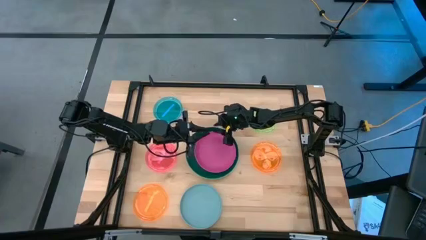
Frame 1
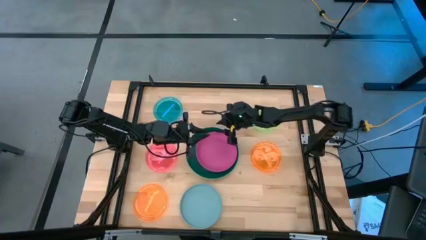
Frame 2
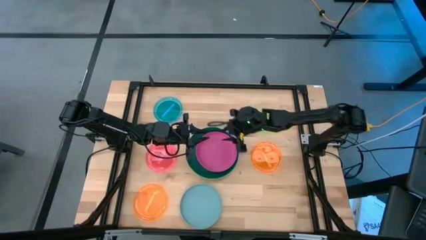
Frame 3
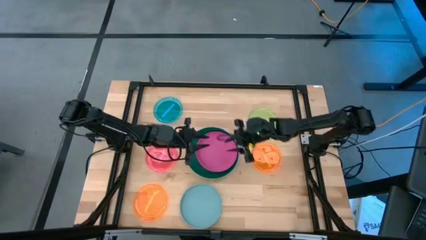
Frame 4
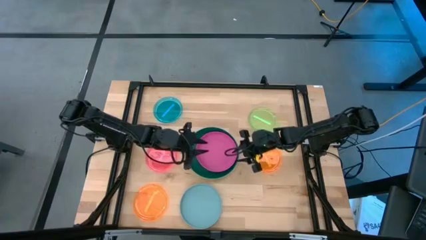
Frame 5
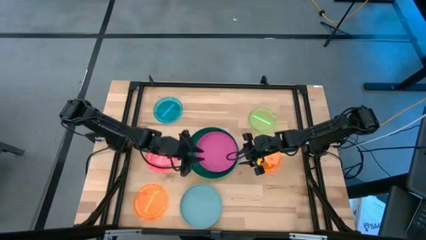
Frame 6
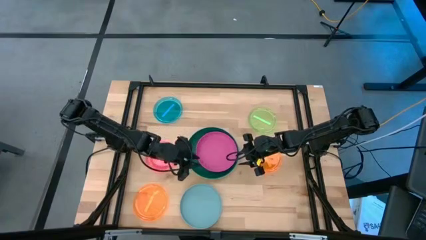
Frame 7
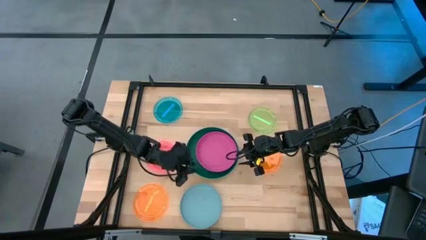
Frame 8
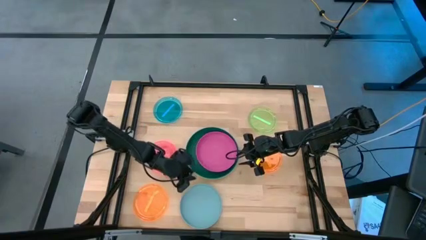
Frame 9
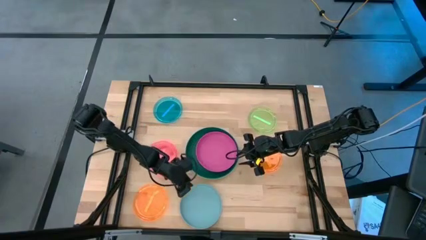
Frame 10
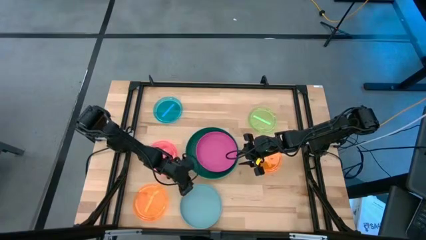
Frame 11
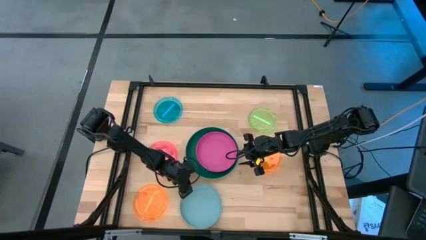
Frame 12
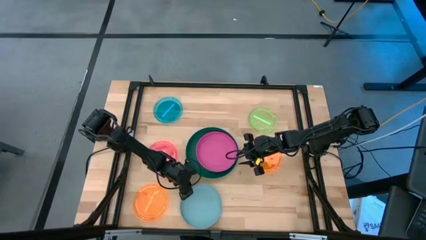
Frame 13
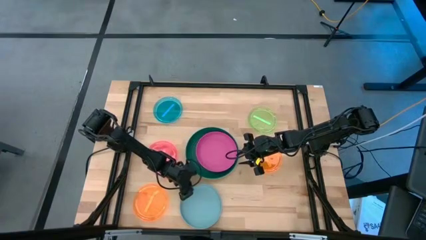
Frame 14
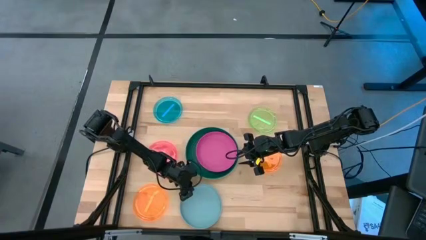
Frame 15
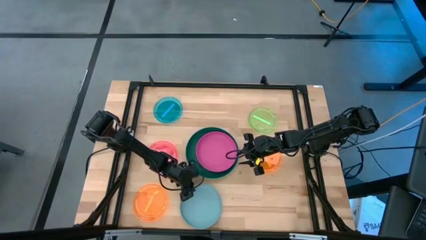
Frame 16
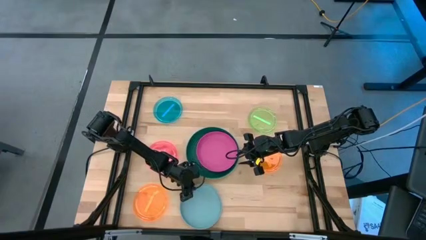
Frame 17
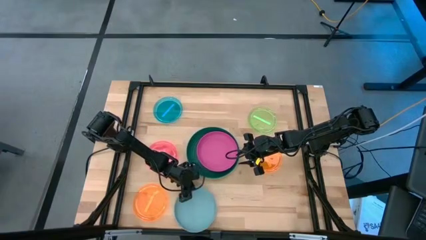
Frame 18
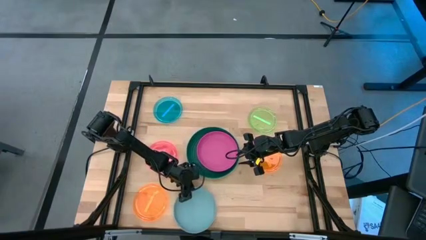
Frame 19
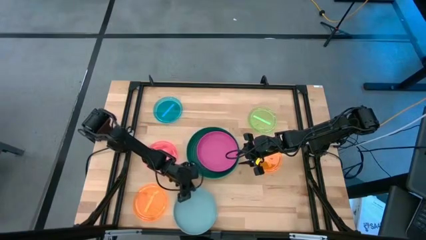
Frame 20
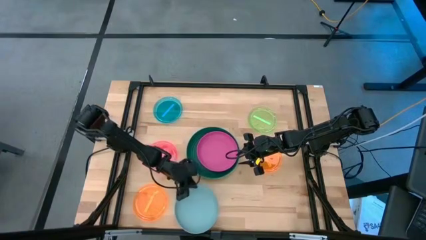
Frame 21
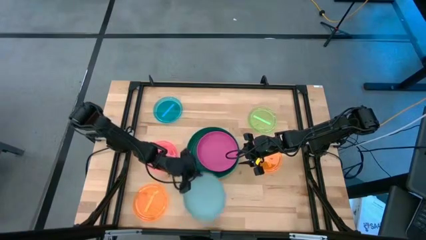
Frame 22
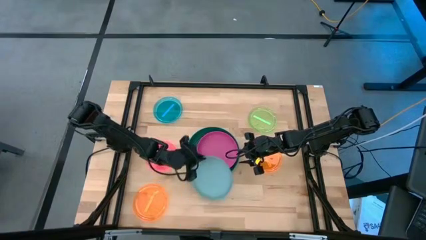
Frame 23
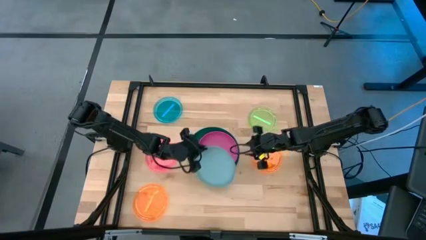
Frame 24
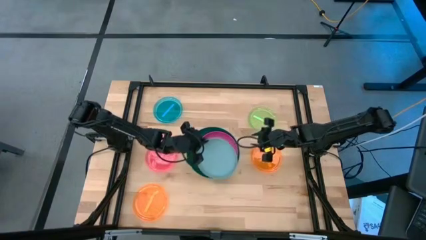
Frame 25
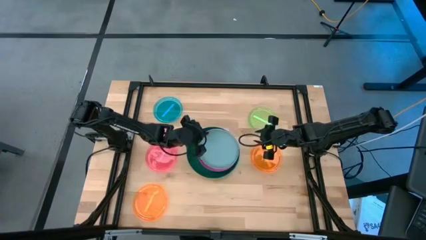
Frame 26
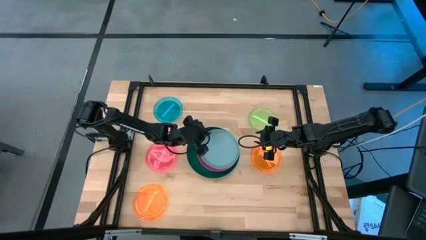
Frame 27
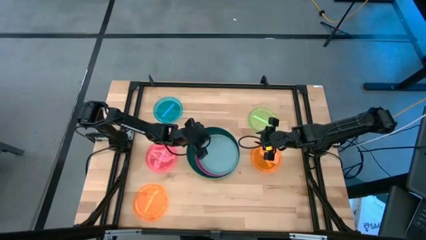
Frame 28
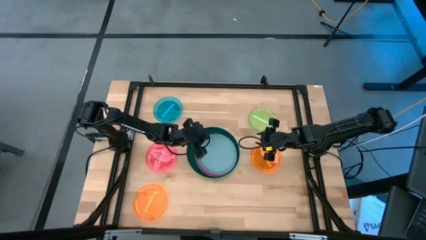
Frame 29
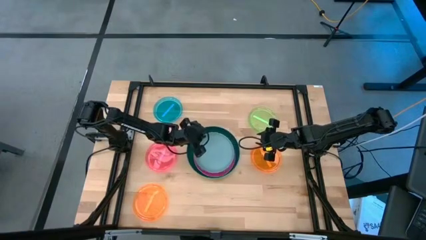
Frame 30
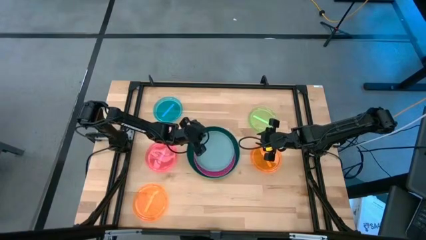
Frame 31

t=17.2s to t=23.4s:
Task: Stack plastic plates
Stack the light blue plate on top of the dark pink plate

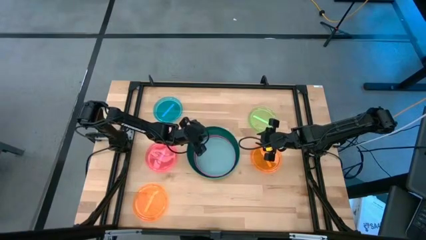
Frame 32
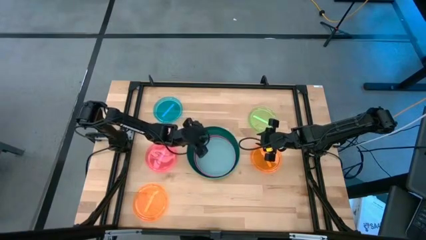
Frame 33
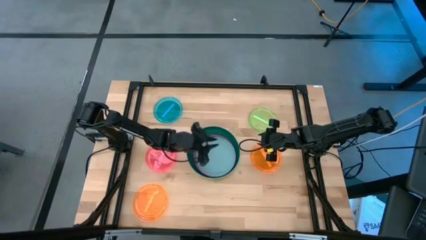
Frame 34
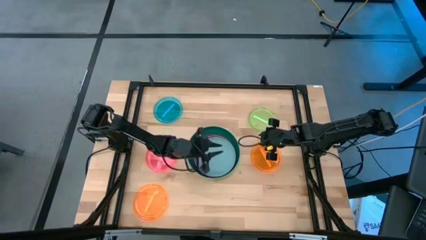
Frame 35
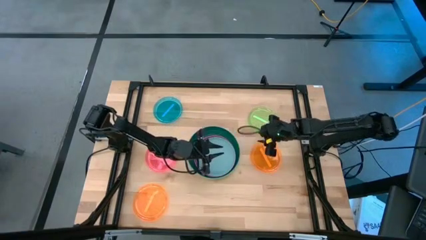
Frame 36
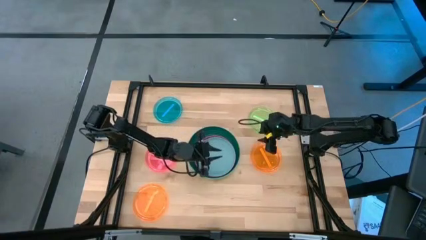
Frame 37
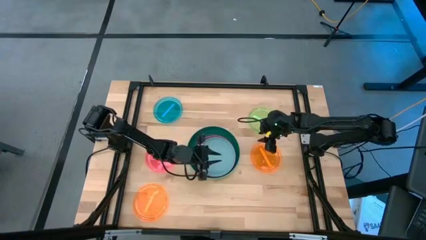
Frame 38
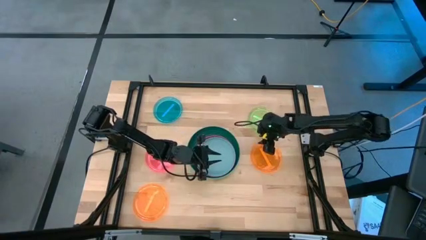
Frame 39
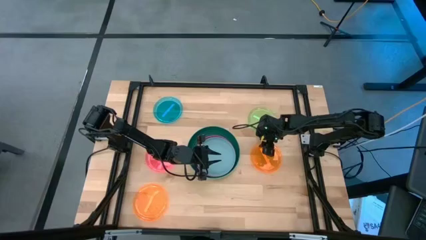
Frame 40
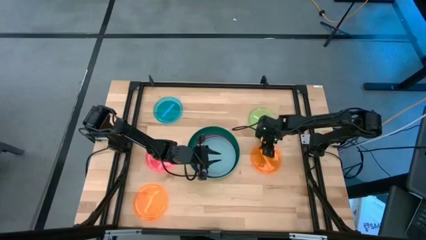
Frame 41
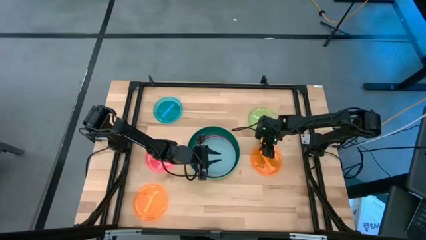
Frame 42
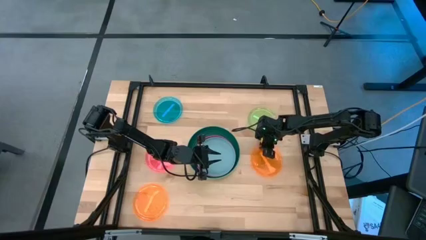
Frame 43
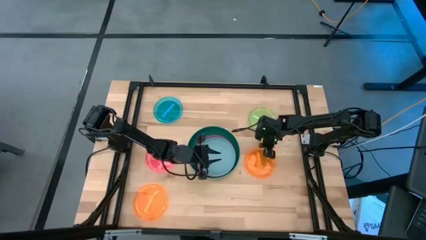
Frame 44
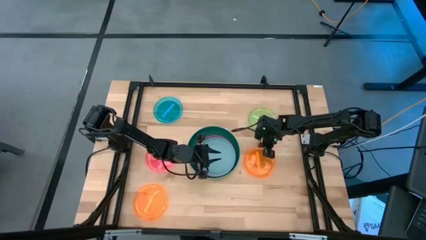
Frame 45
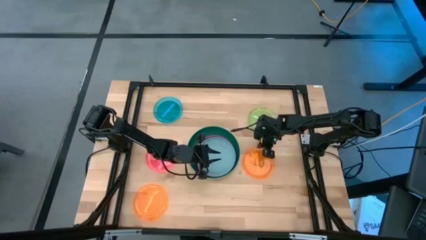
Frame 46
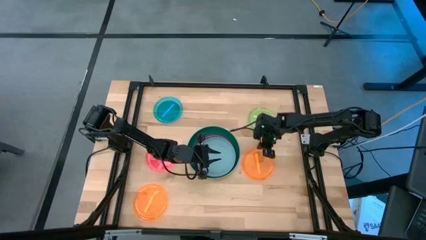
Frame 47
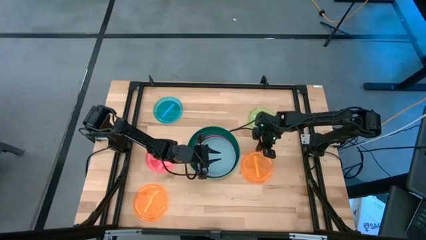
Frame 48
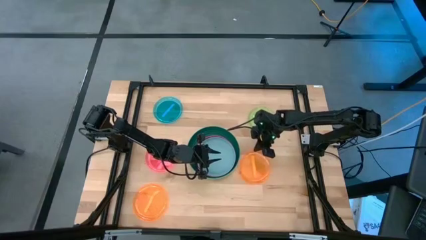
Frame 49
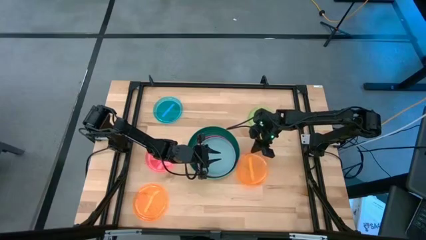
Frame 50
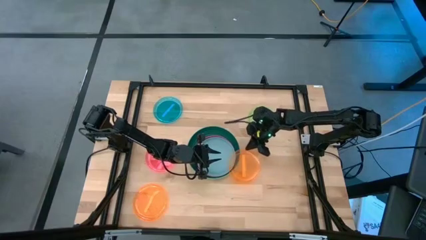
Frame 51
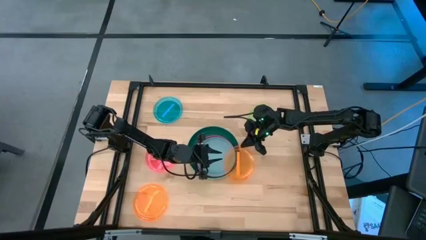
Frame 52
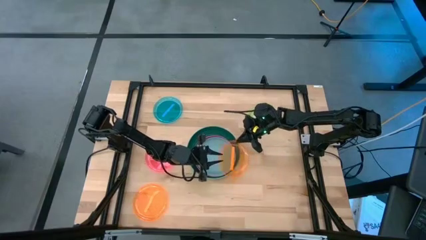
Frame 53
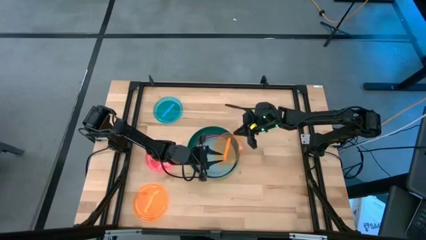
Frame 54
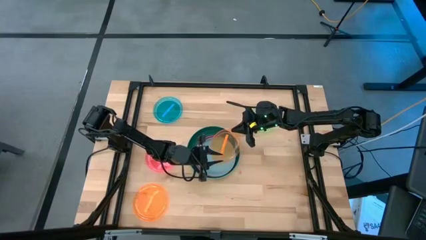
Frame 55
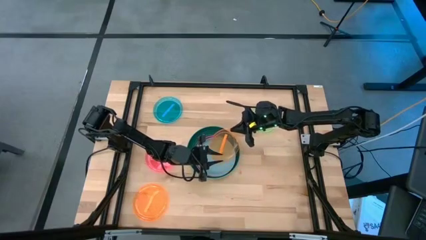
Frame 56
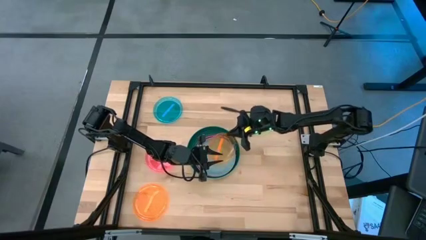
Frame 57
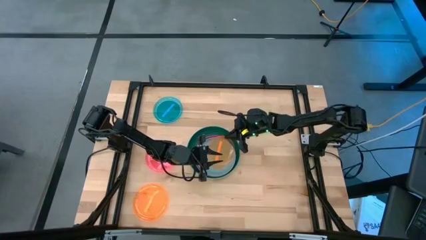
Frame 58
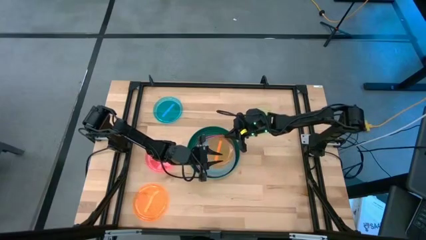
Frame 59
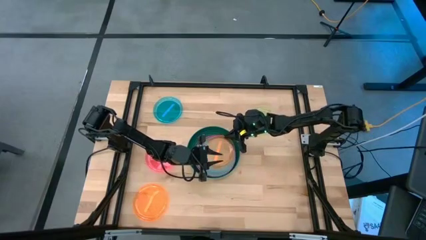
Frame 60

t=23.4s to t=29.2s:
Stack the right orange plate on top of the light blue plate

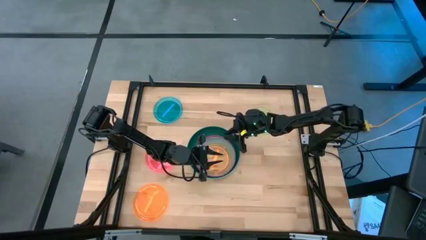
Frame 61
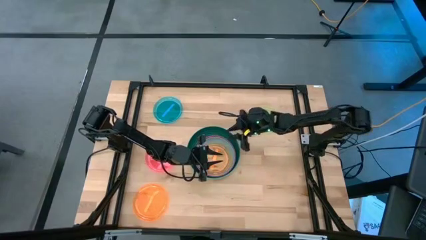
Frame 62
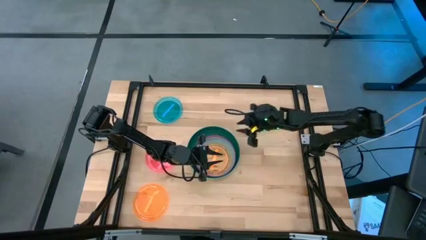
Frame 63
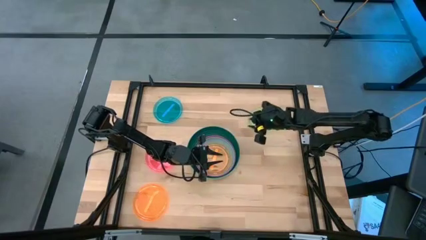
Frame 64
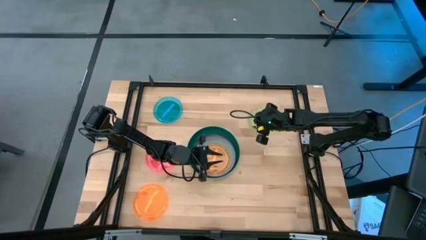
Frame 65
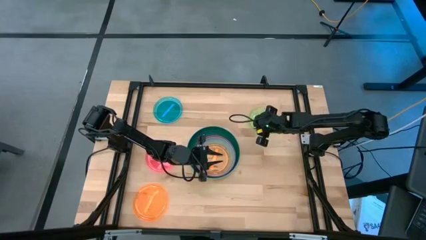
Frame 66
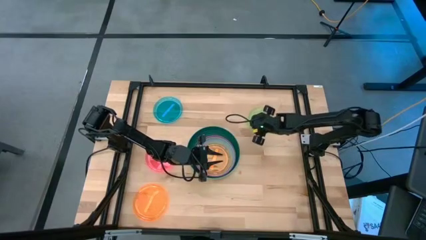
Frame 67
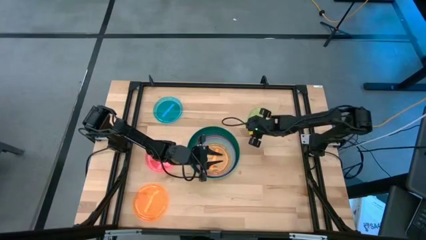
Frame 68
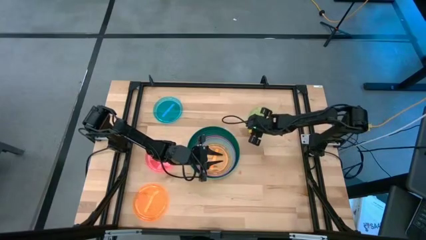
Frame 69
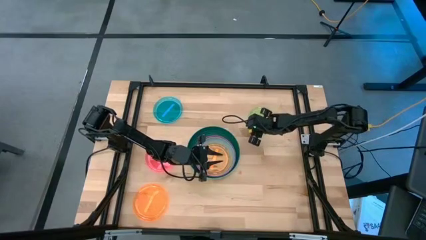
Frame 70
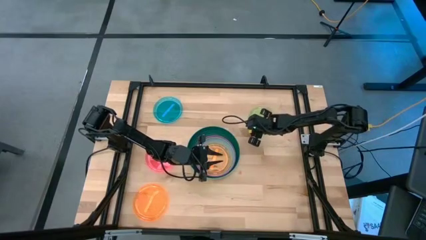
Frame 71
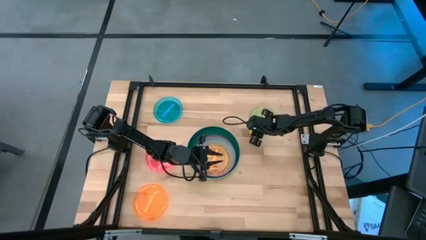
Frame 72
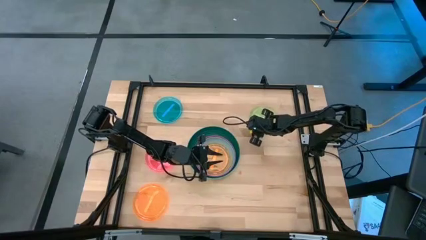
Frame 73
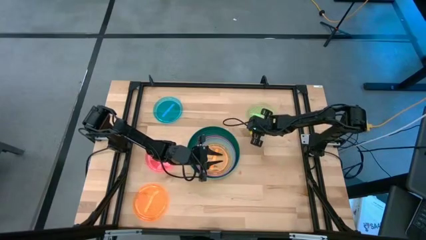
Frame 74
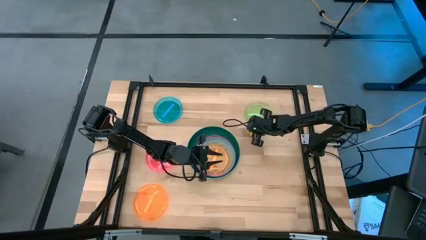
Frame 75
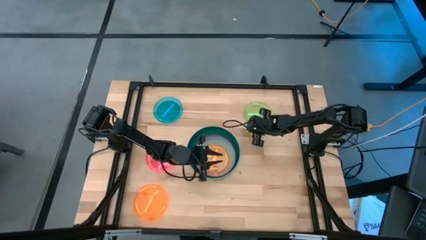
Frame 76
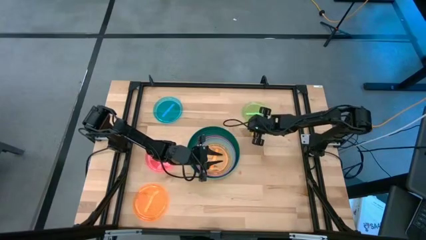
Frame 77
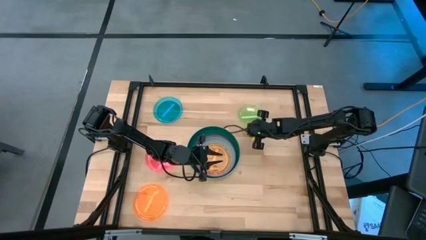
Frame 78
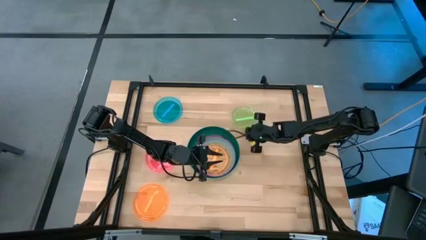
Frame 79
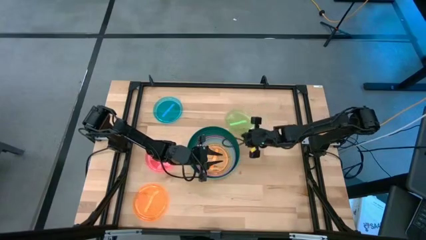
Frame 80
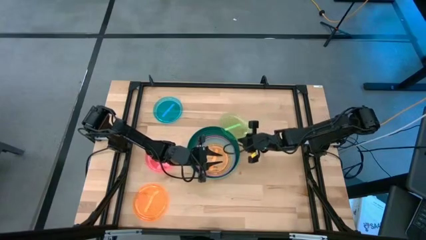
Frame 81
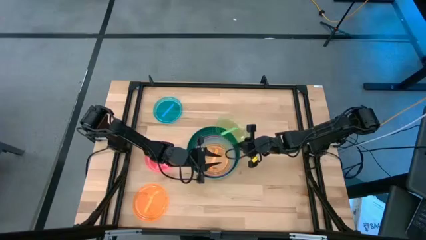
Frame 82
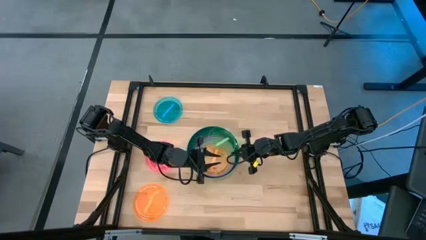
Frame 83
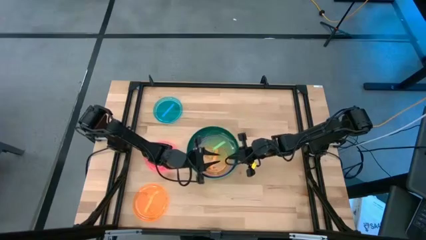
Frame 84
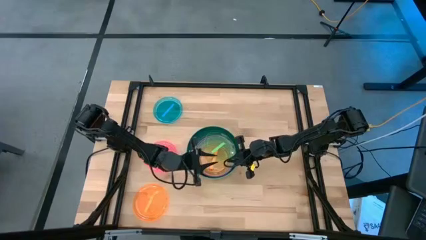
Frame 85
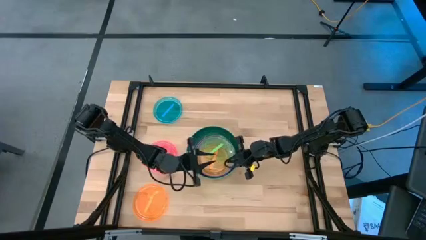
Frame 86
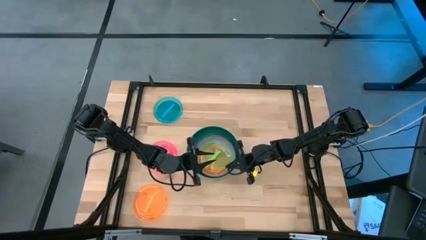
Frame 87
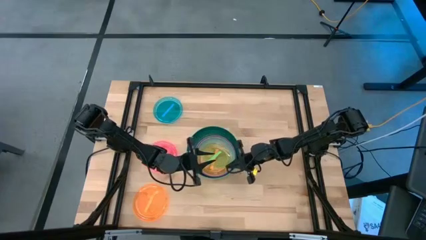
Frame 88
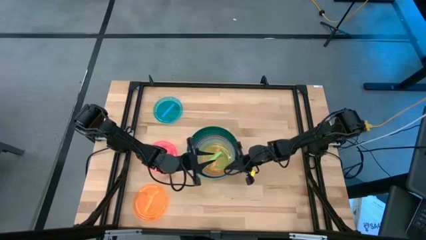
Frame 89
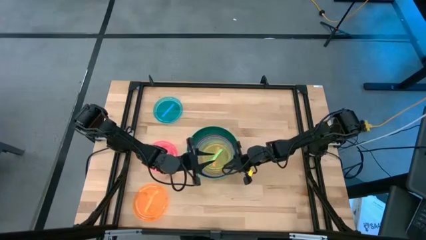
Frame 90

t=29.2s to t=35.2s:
Stack the green plate on top of the orange plate
